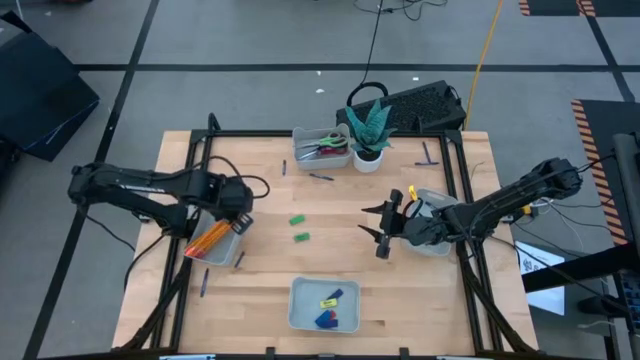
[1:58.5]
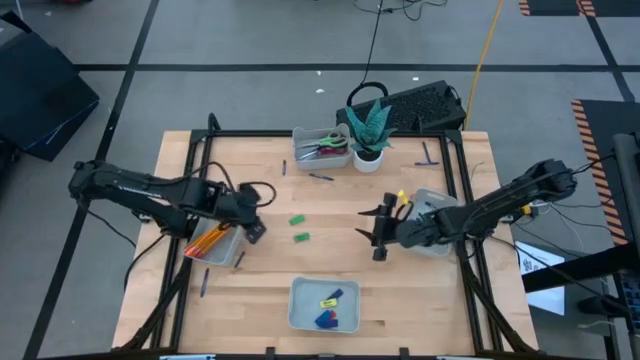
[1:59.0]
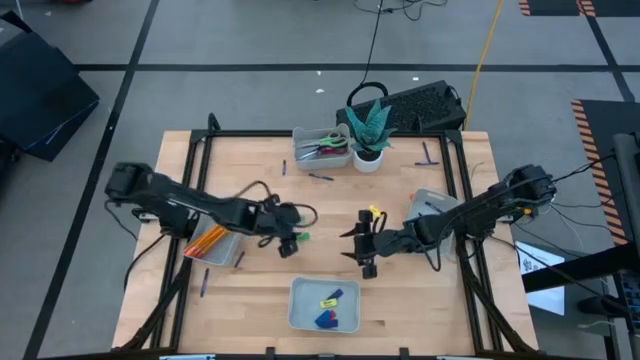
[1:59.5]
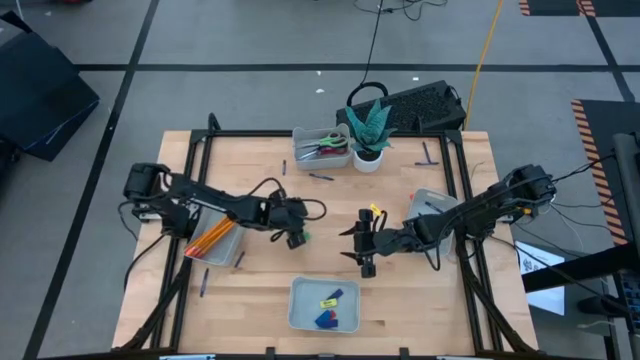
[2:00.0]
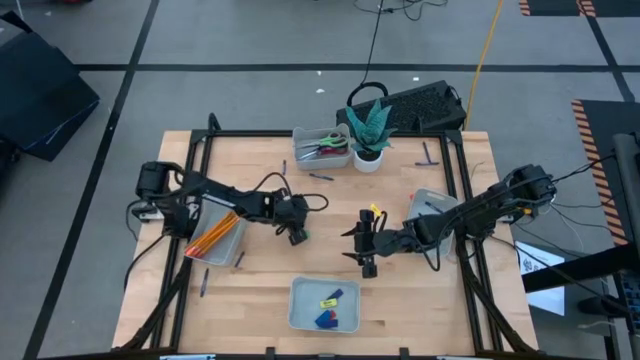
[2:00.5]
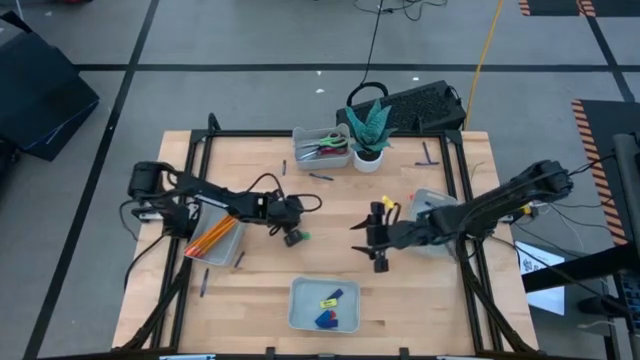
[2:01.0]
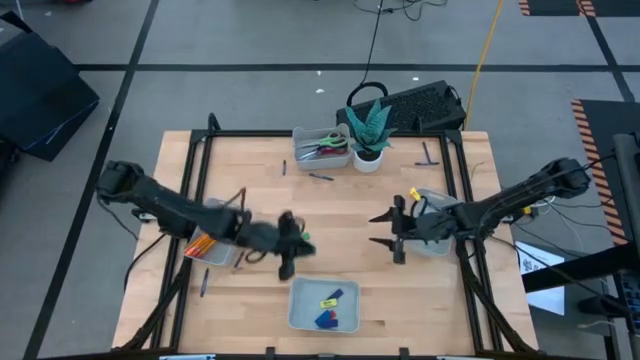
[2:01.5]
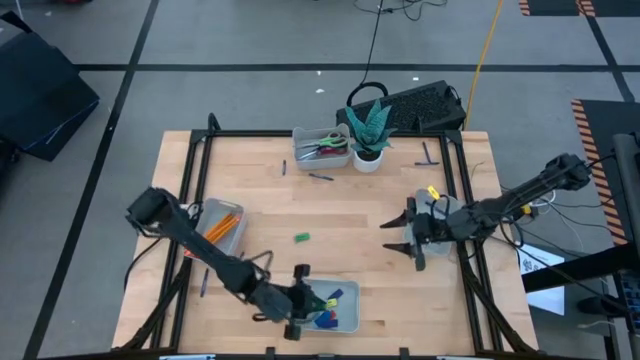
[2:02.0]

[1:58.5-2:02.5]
Task: Sort crayons/erasers/pens/pencils in bins
Put the green eraser into the bottom gray bin

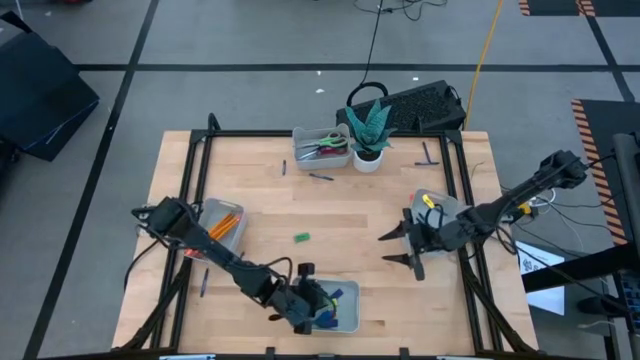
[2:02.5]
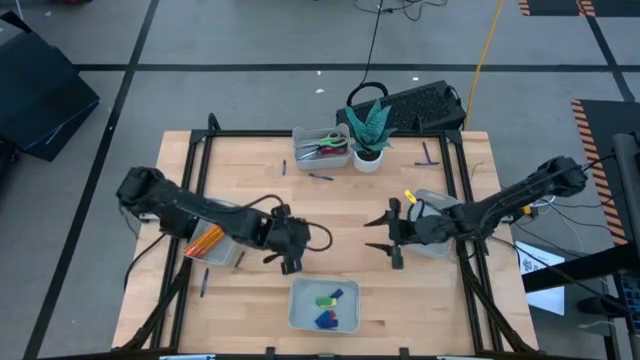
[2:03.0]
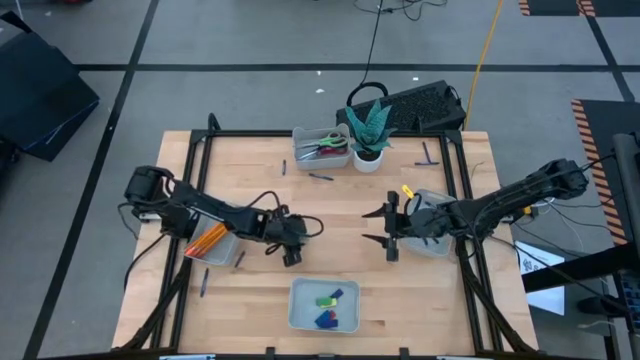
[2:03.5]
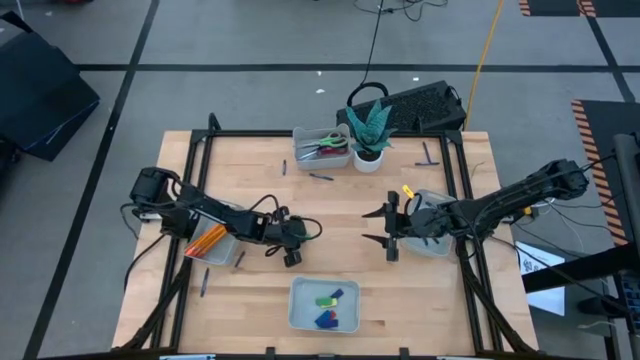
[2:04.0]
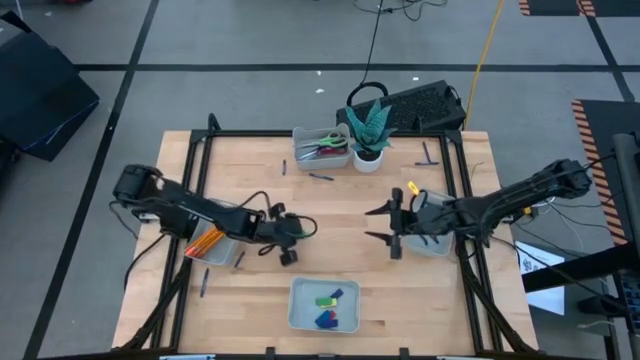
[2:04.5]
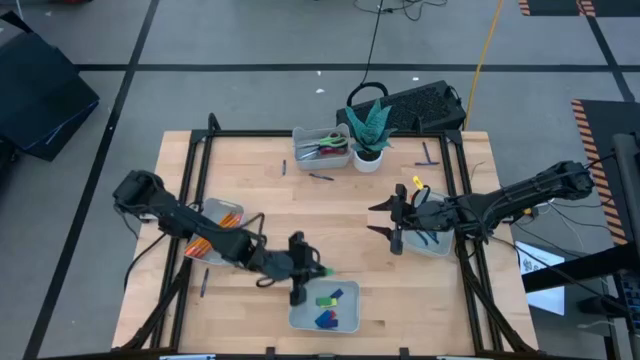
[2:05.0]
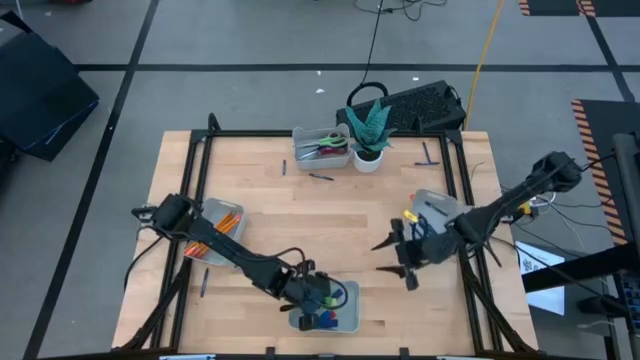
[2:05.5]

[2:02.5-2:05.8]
Put the green eraser into the bottom gray bin

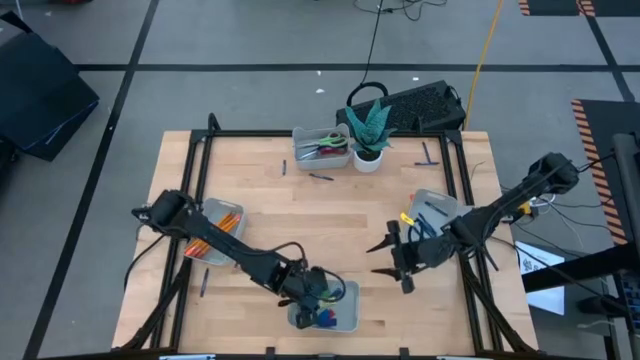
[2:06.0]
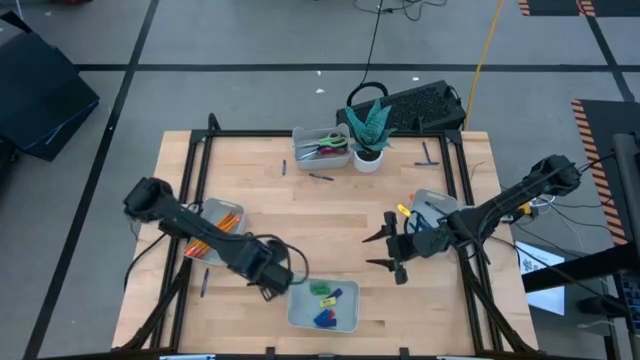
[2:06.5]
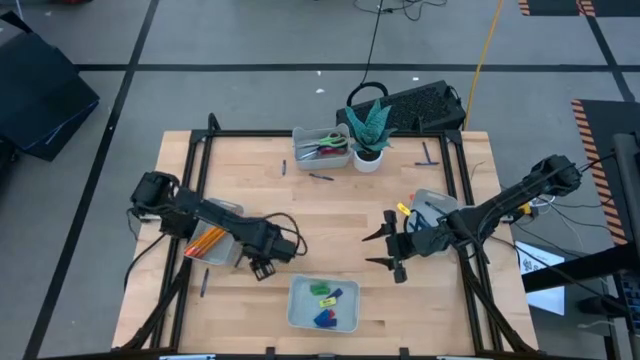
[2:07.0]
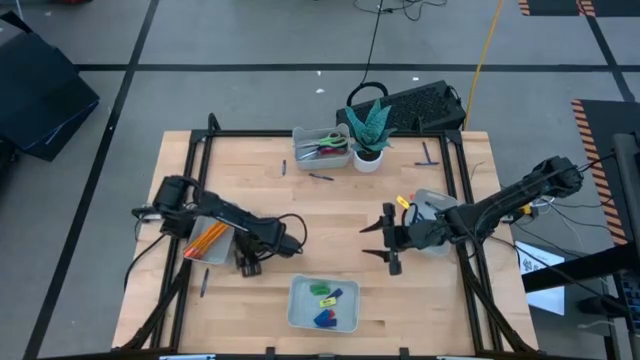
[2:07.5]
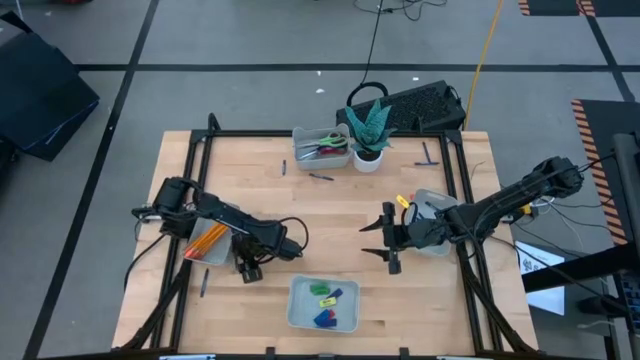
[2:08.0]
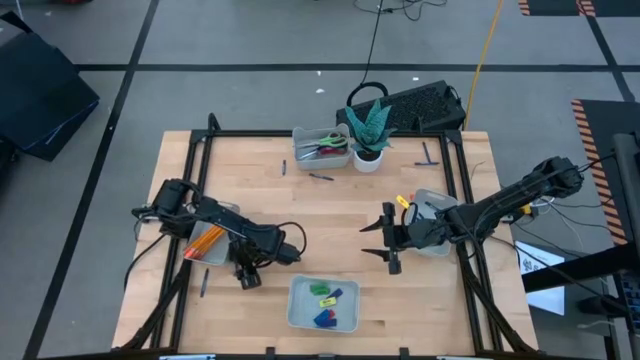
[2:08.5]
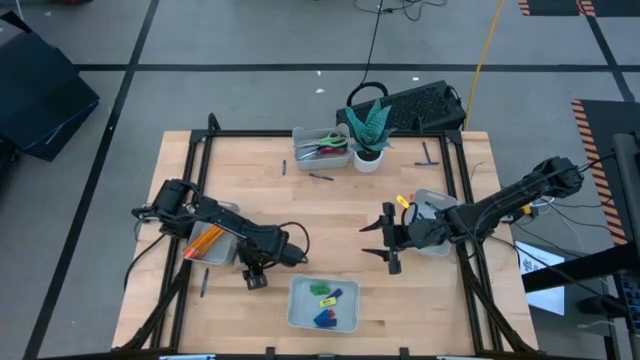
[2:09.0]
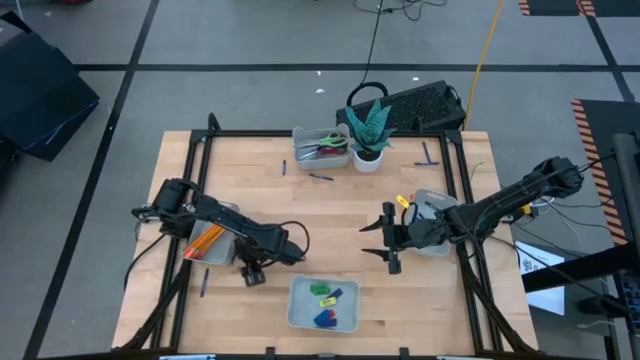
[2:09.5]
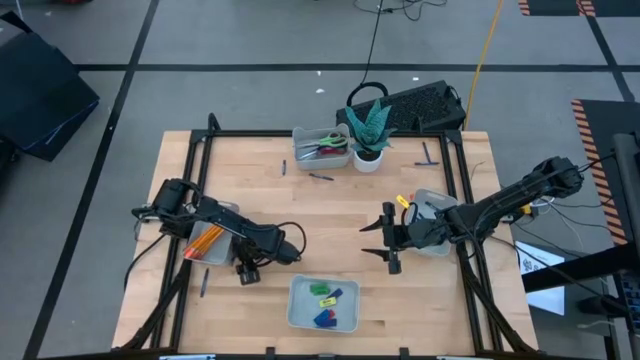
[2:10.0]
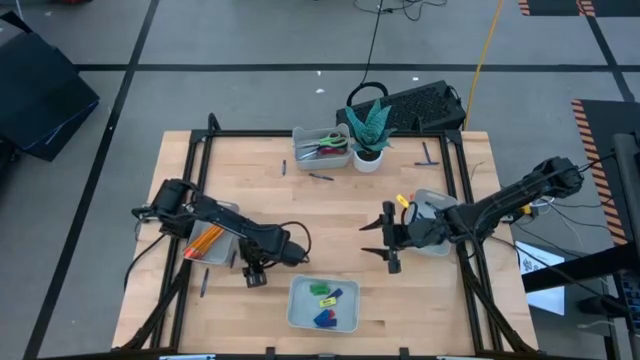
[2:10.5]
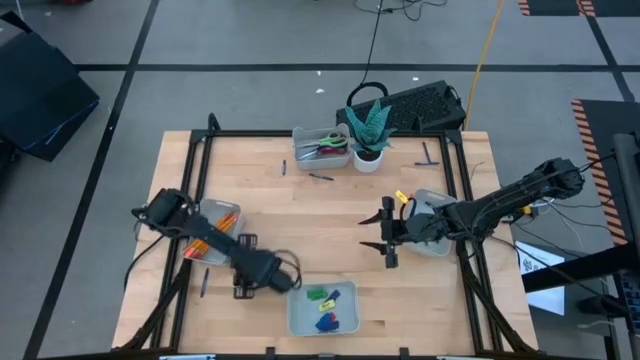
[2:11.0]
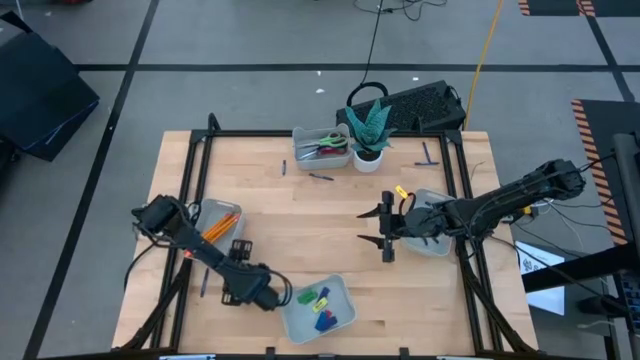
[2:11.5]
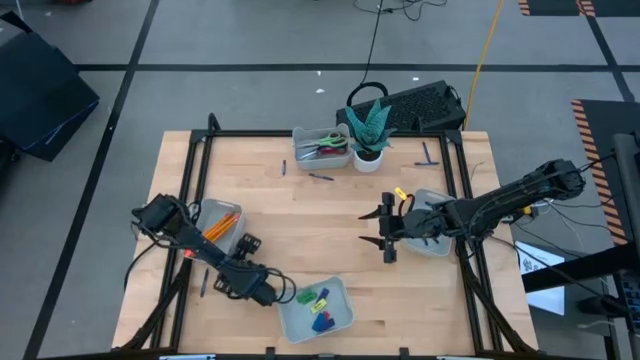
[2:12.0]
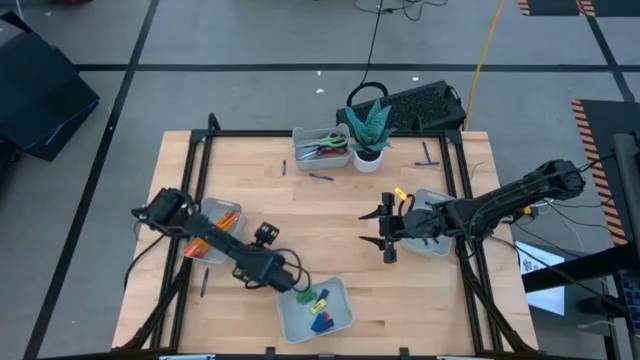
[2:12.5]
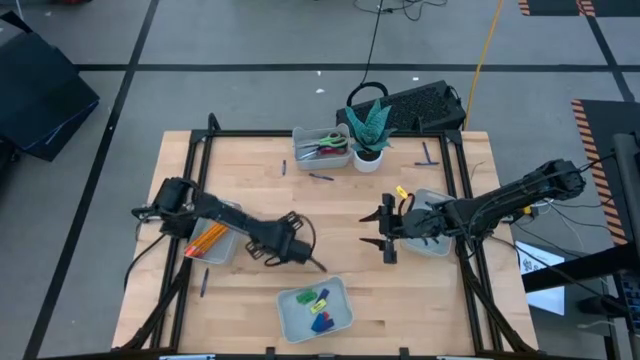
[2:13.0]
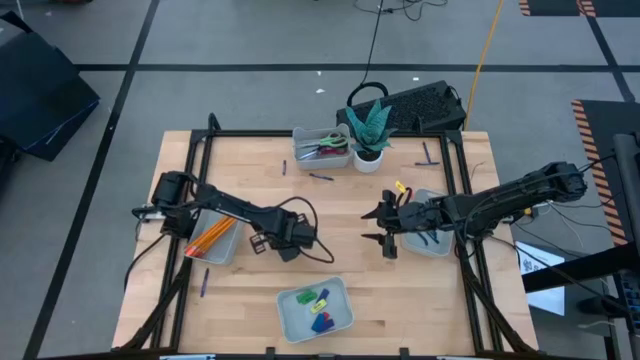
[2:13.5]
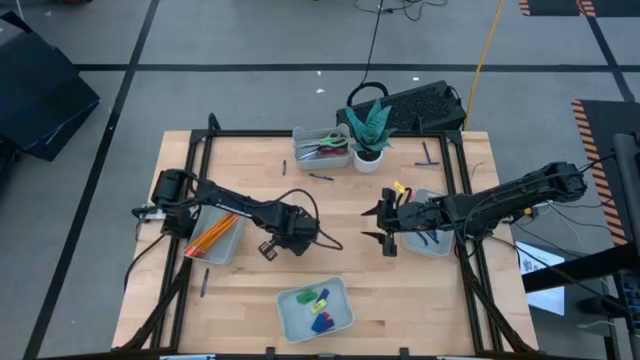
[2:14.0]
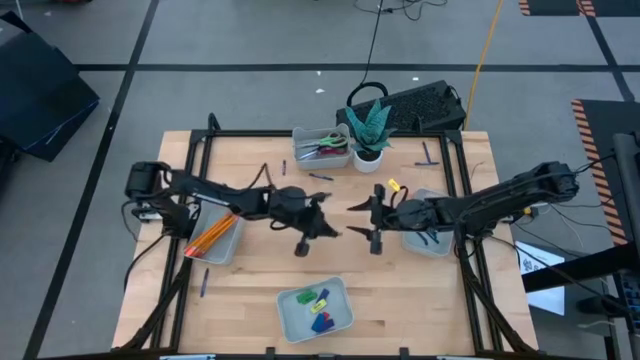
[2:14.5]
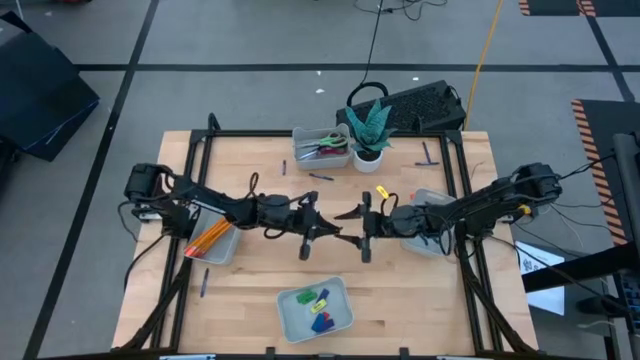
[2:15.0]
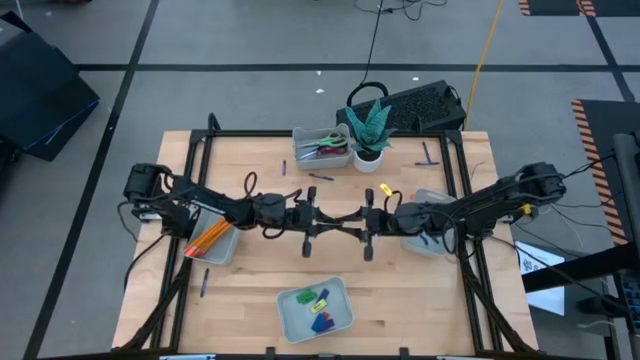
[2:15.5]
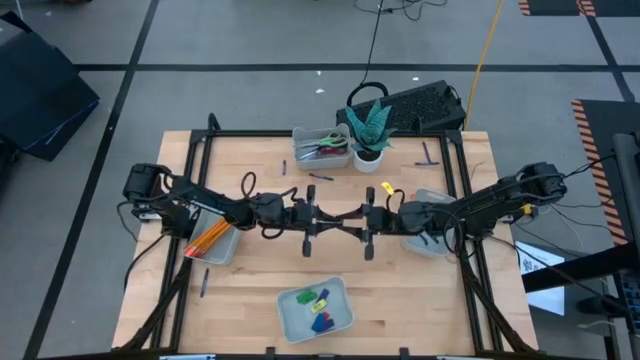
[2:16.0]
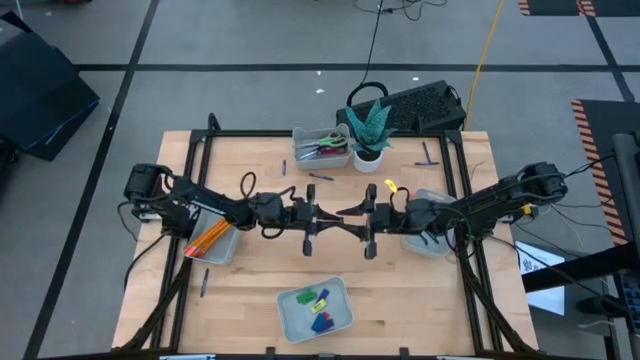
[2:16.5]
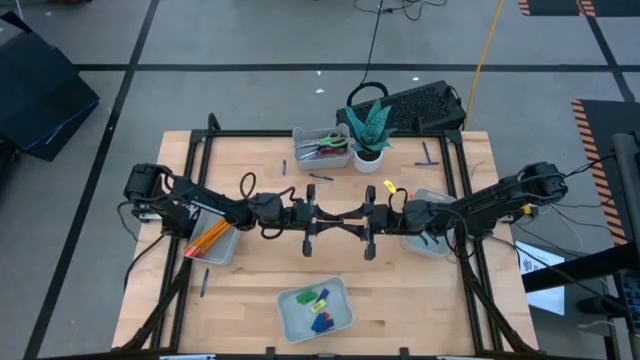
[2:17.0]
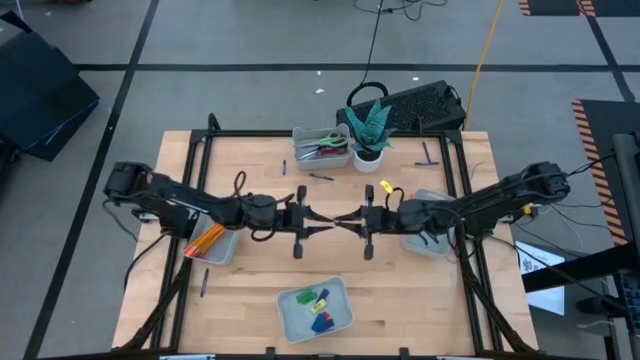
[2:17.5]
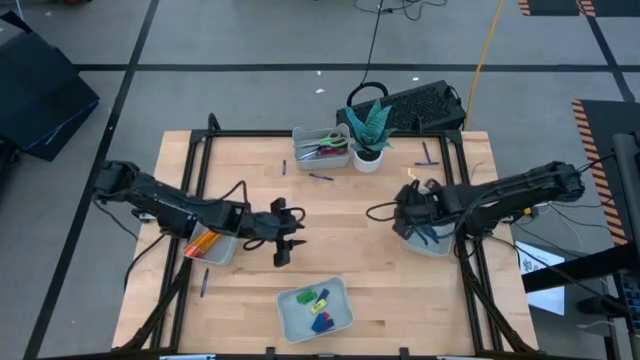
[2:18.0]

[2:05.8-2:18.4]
Put the blue crayon into the middle right gray bin

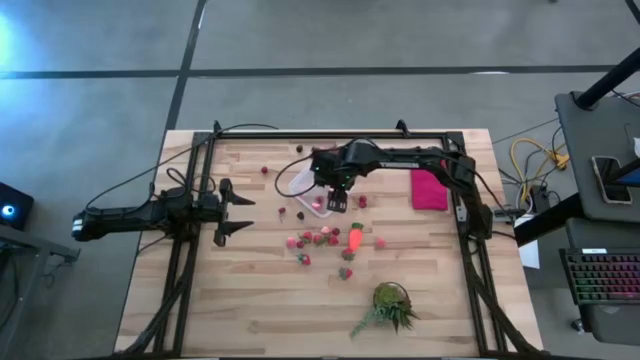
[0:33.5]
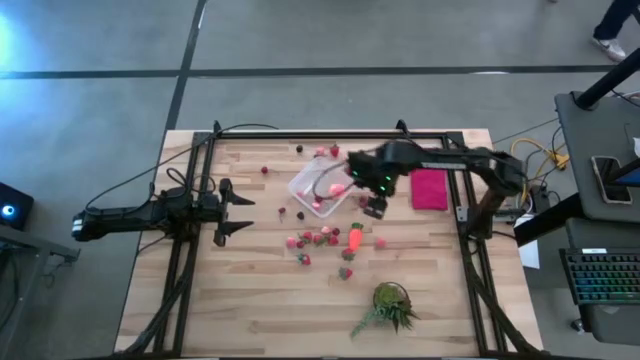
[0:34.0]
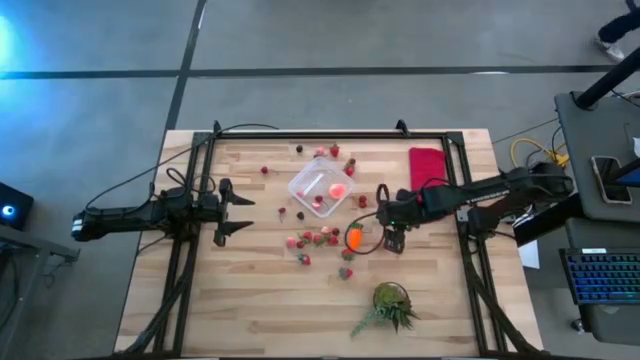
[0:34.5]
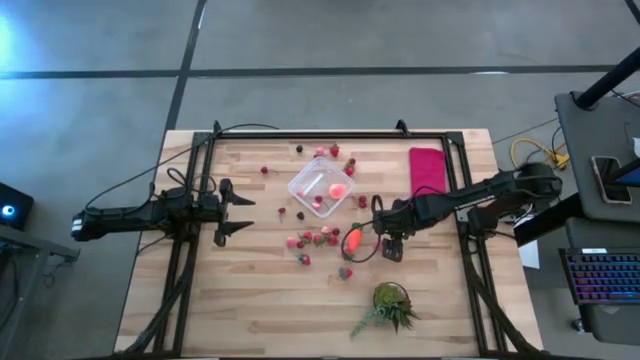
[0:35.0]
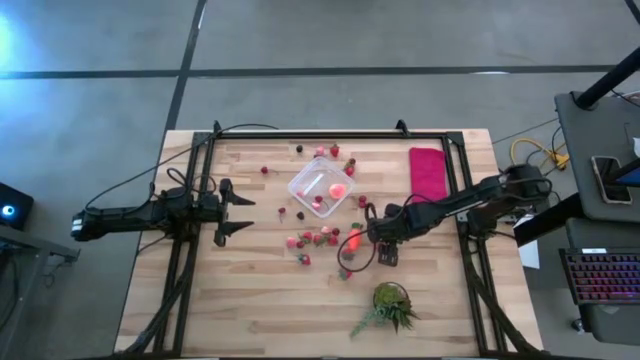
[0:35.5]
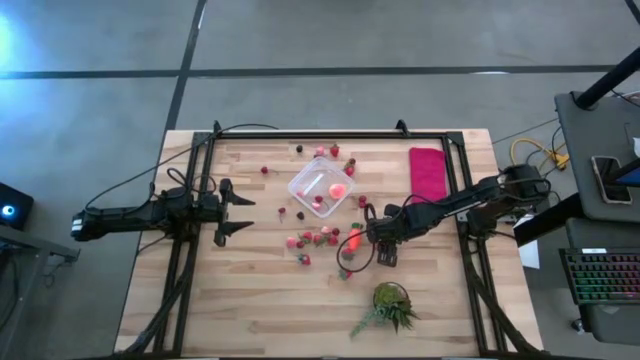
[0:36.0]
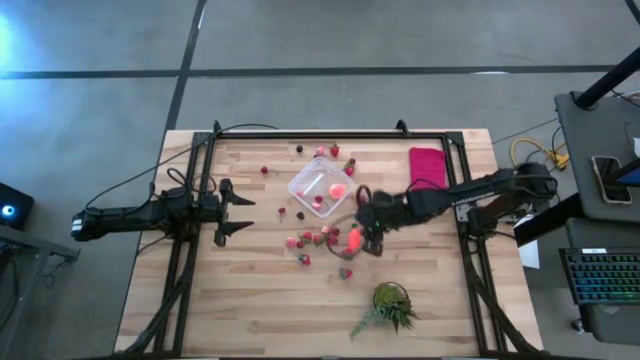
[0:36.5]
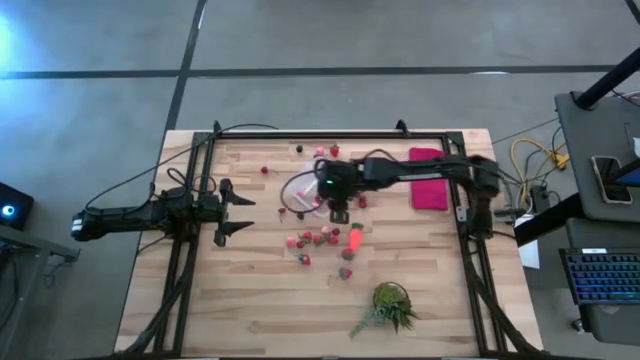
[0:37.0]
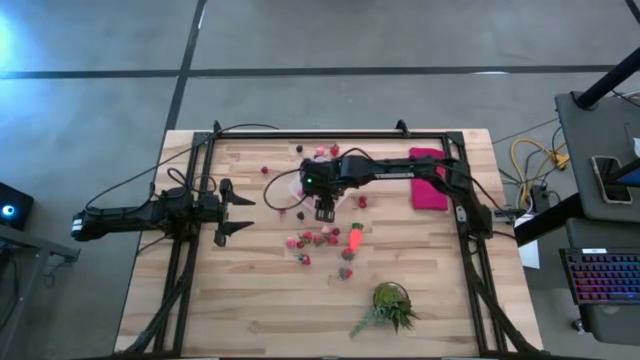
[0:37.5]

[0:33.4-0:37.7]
Task: Pick and placing Produce into tupperware
Put the pink apricot into the transparent container
